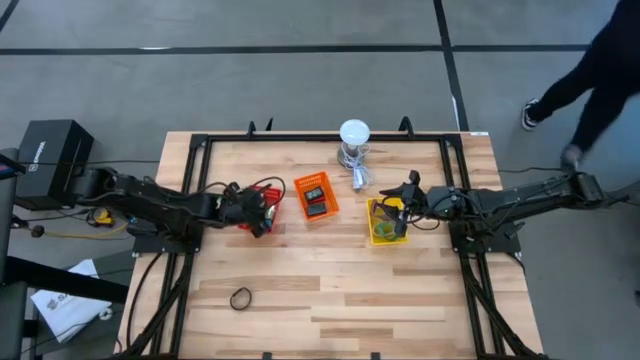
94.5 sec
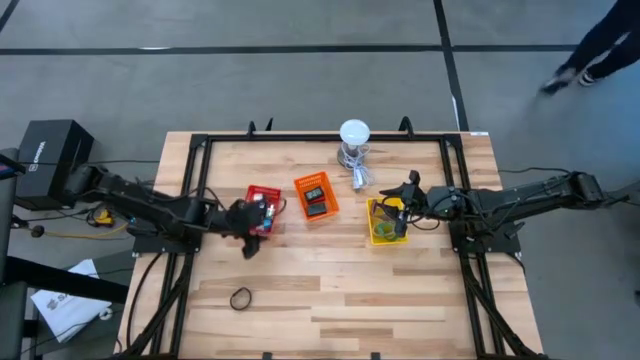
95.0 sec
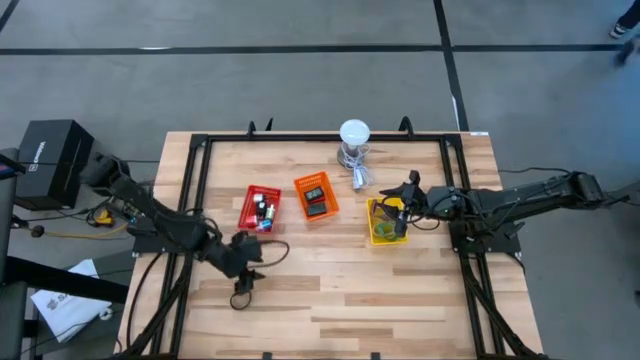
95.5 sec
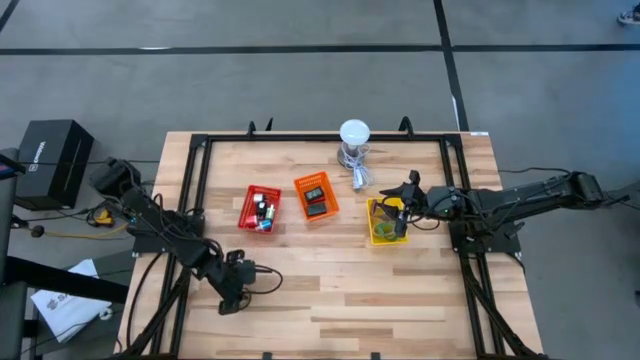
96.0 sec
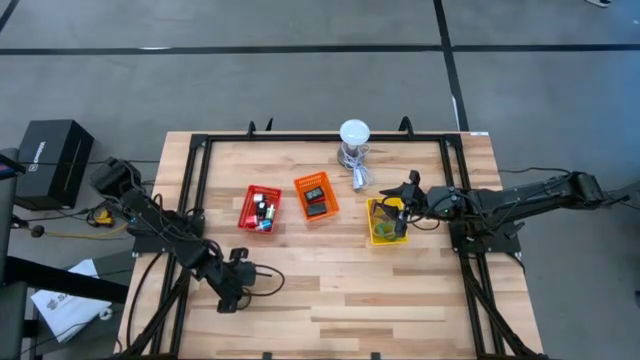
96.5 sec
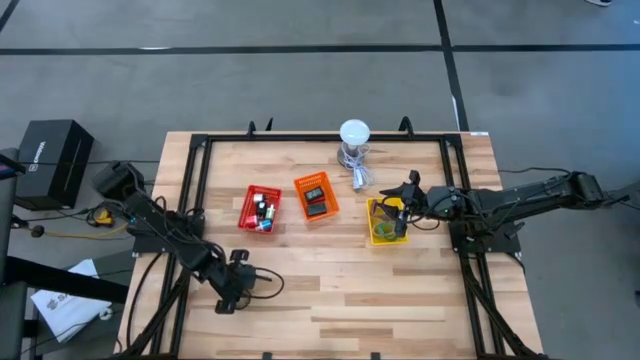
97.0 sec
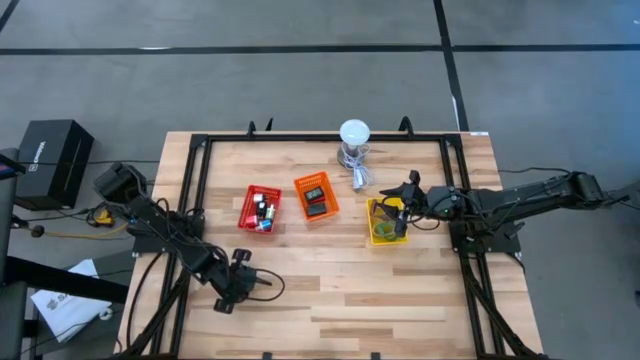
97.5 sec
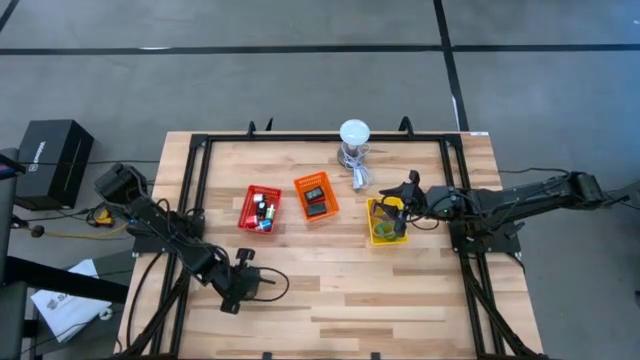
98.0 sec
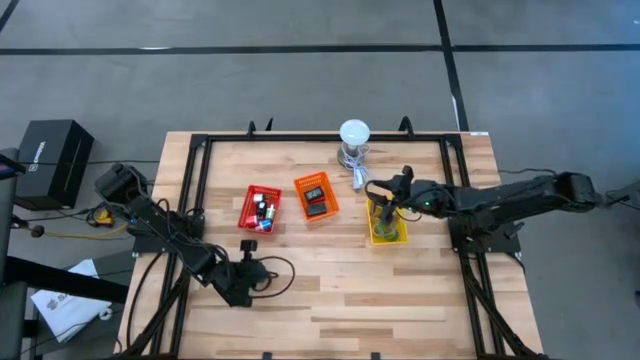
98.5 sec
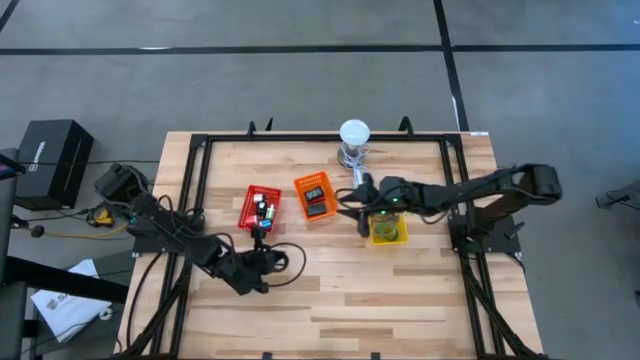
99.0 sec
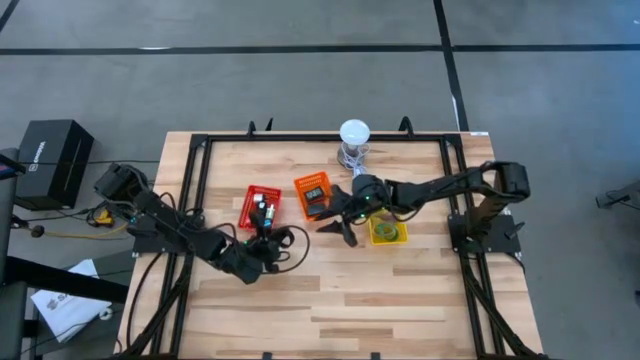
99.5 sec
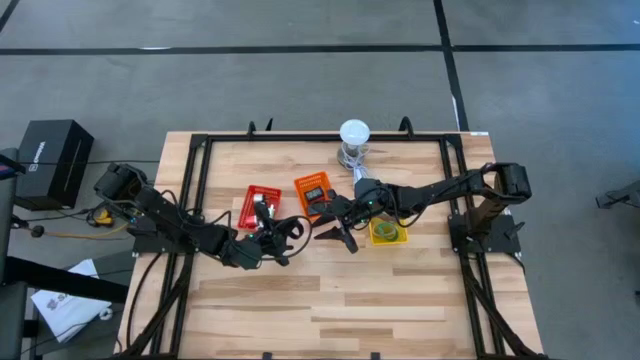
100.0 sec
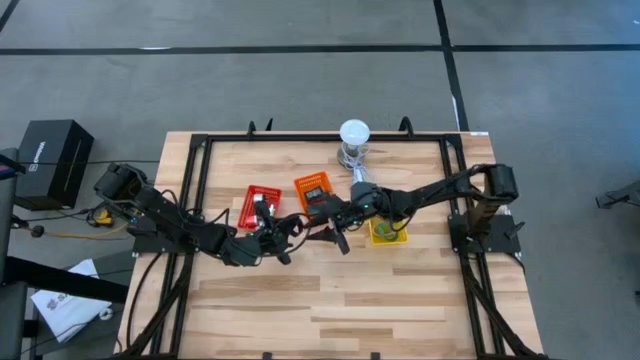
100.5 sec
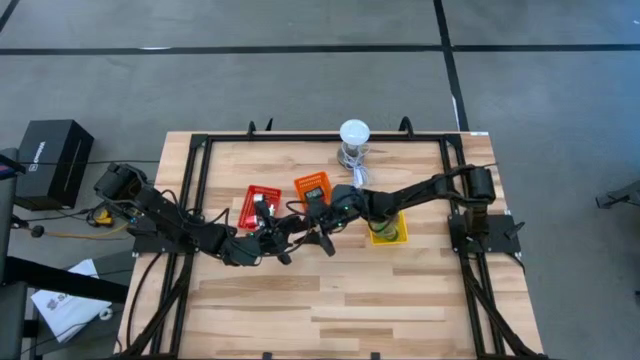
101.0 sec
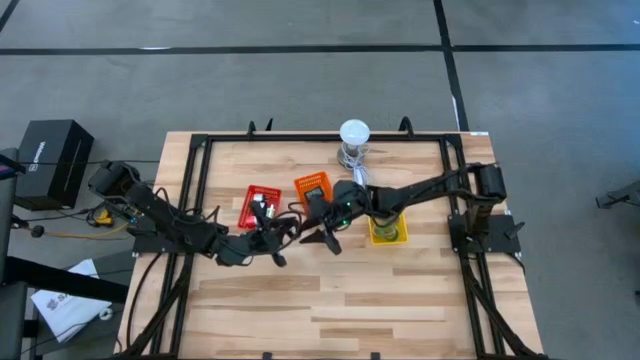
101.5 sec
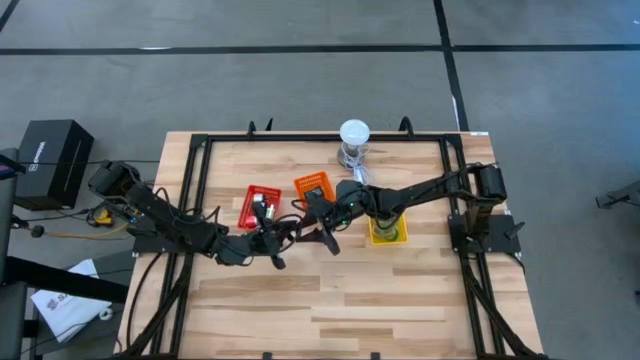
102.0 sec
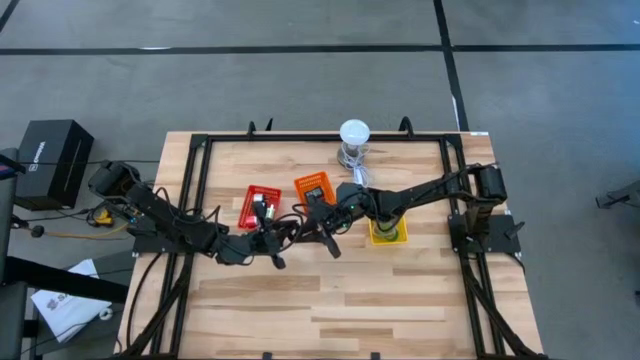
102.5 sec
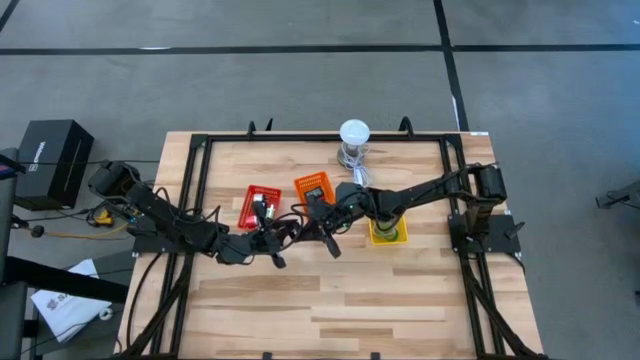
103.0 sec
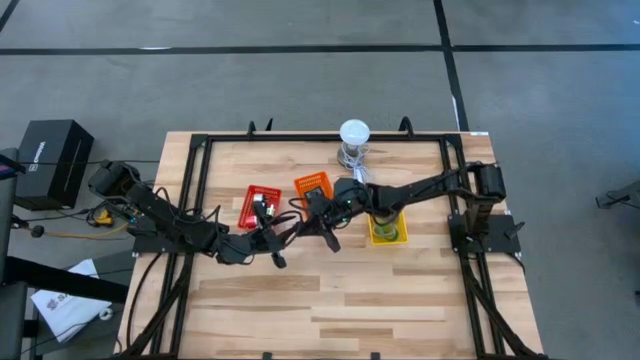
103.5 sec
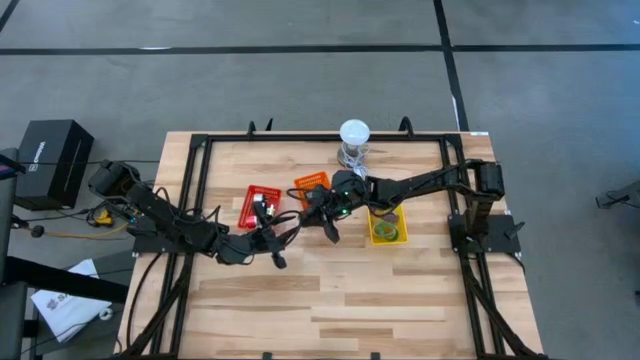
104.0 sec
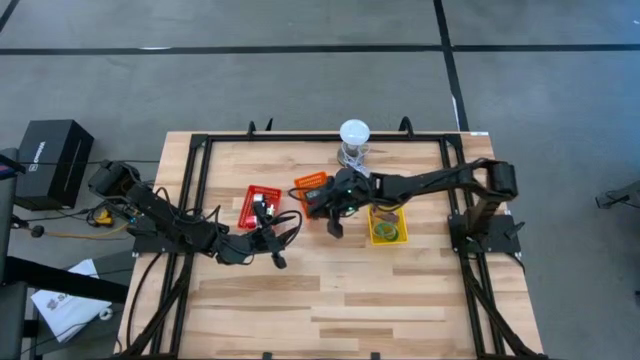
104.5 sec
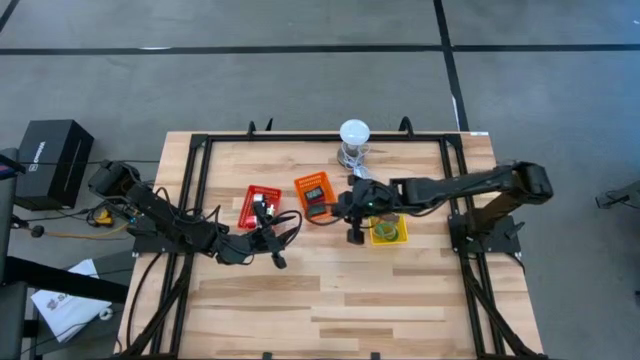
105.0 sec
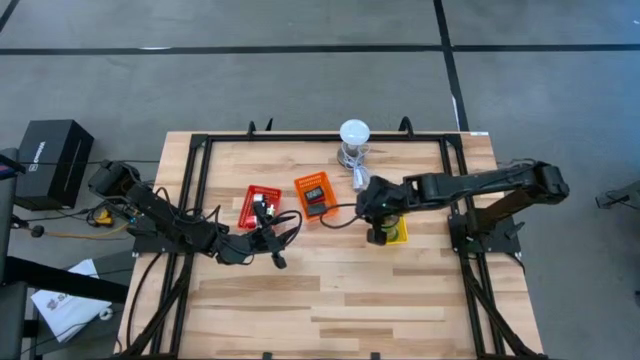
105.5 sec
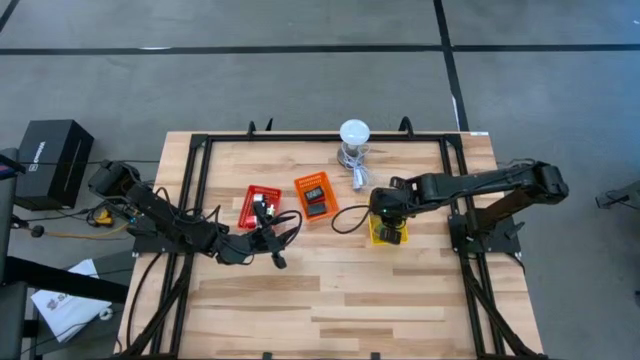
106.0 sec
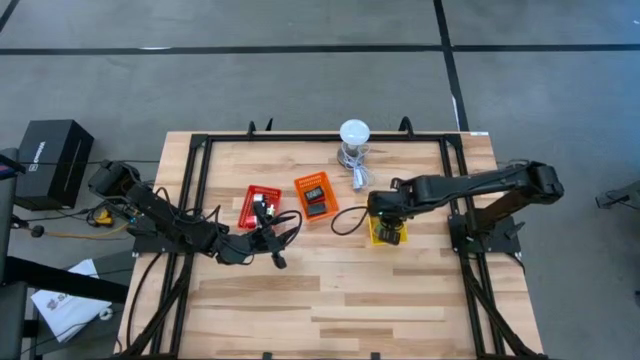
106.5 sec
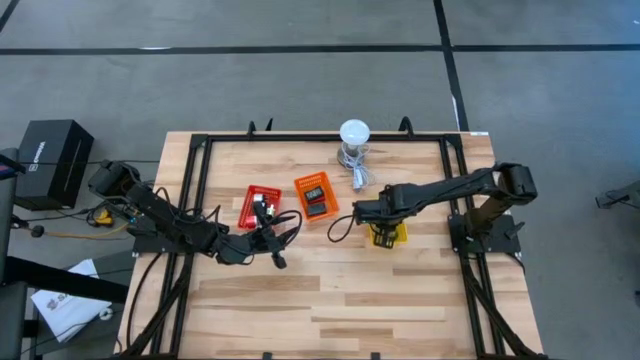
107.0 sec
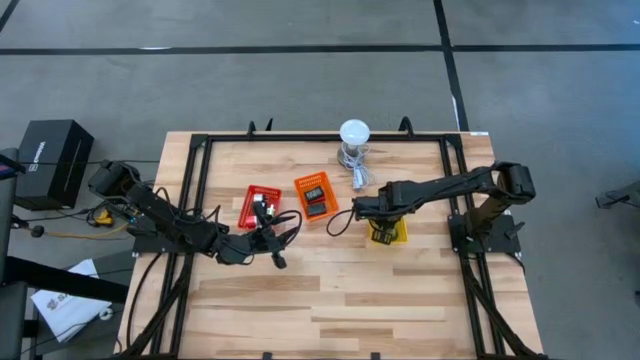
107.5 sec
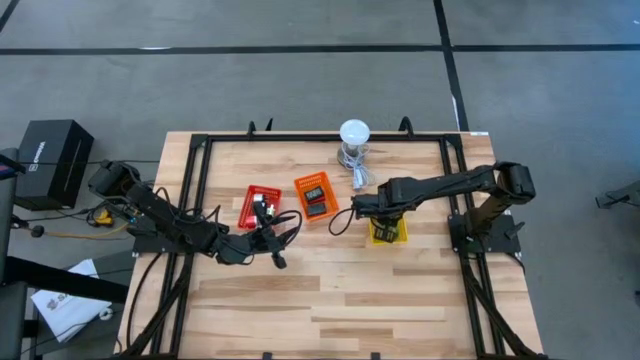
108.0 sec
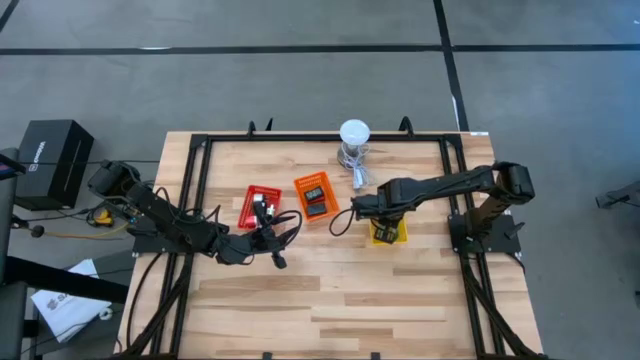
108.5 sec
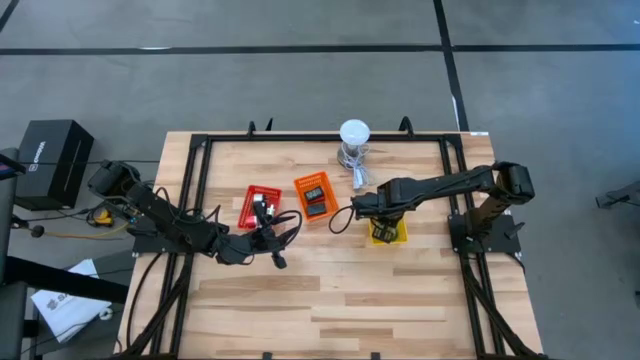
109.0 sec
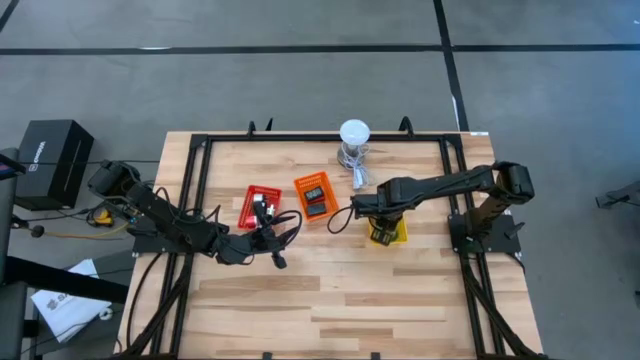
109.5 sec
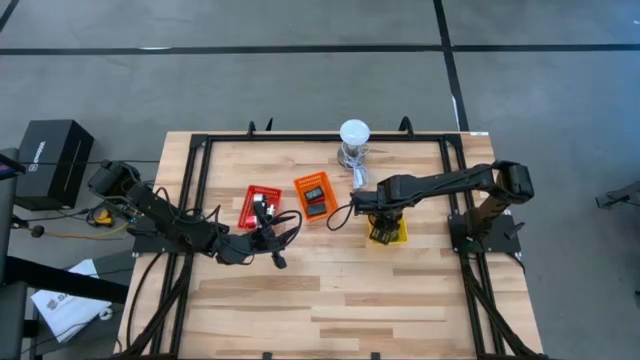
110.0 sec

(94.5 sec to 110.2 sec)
Task: Pick & Place Office items
Put the black wrist watch into the yellow bin

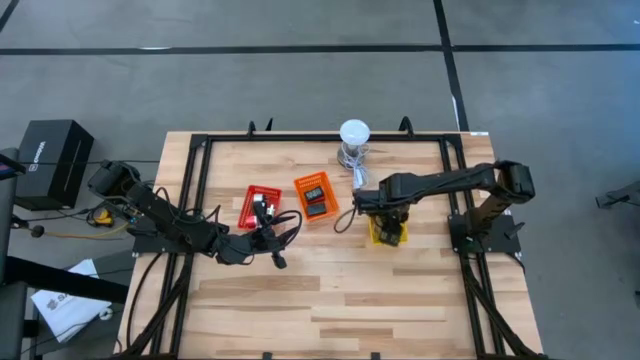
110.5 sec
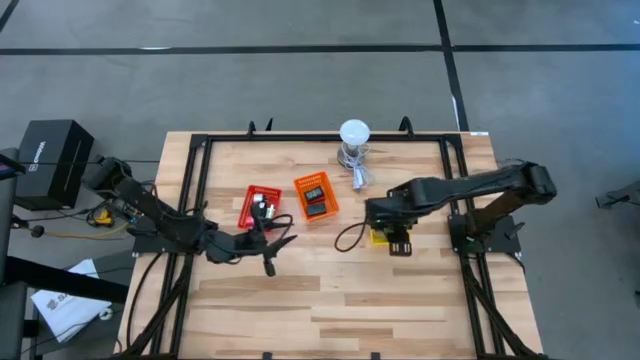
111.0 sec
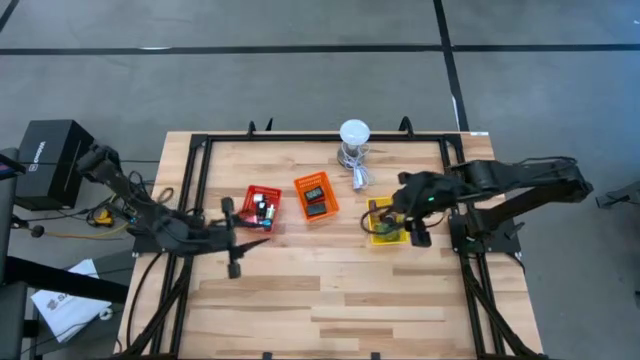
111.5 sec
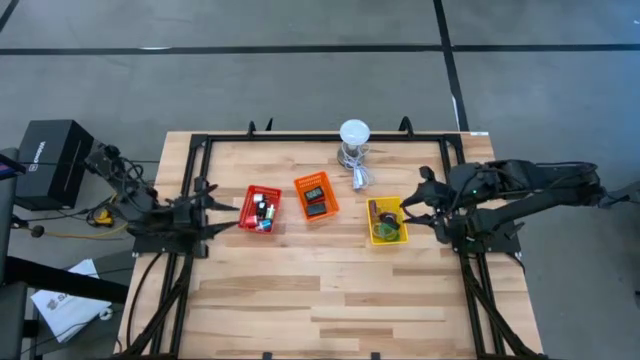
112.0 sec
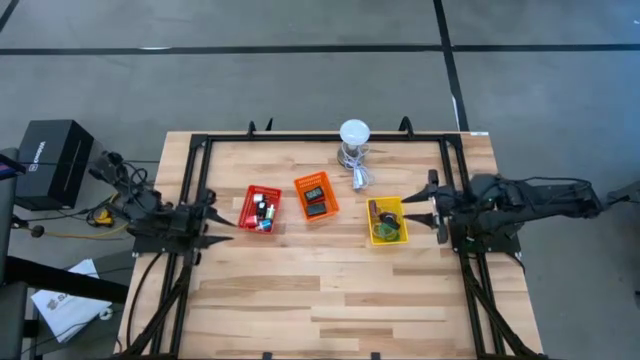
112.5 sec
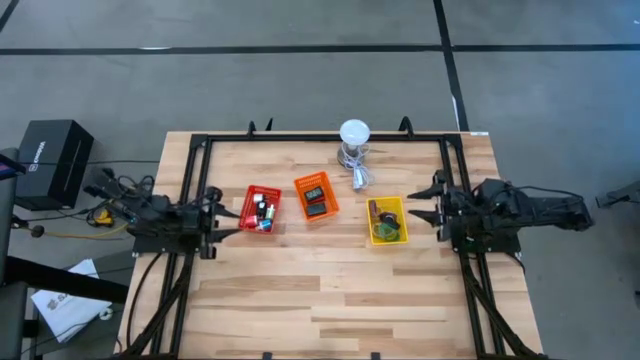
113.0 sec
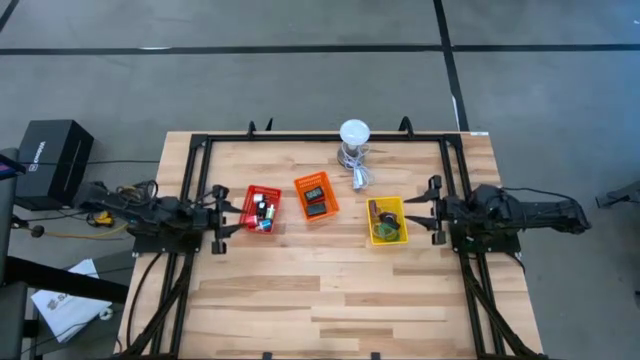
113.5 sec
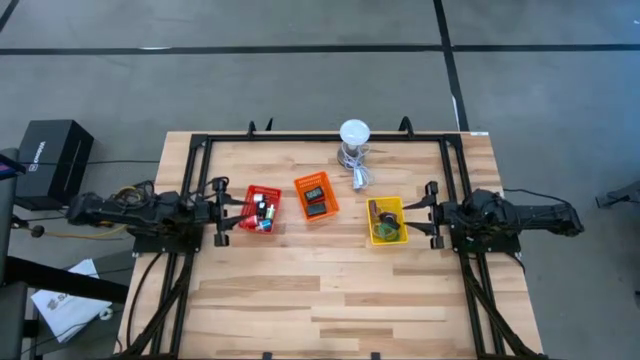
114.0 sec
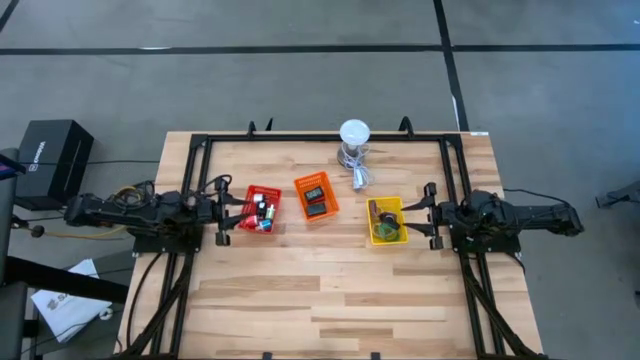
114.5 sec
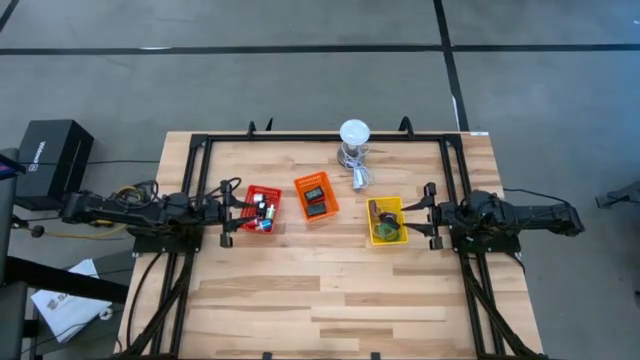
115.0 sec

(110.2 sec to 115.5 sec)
Return to Home Position
